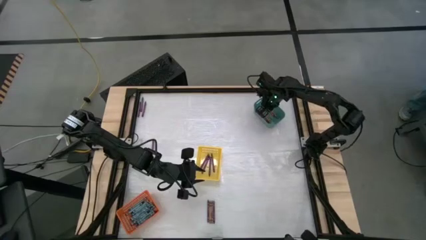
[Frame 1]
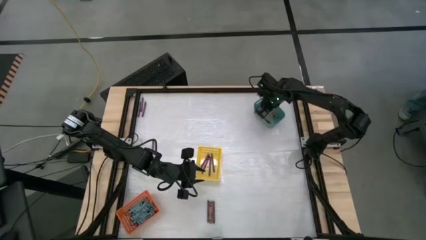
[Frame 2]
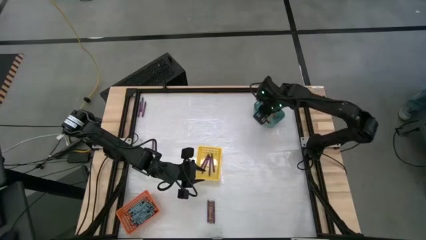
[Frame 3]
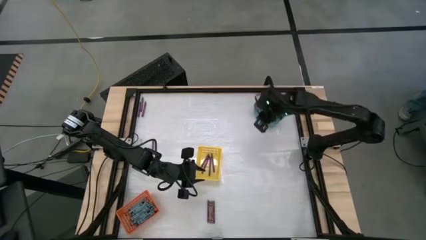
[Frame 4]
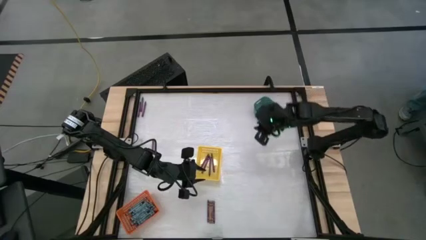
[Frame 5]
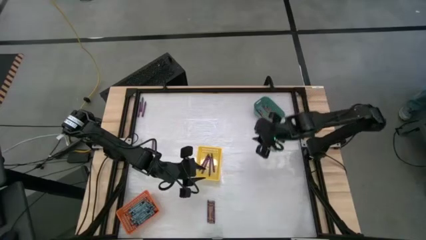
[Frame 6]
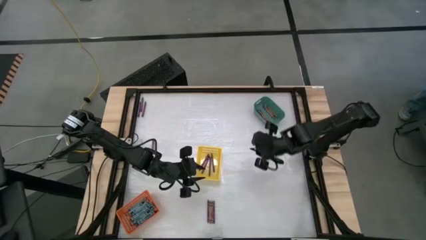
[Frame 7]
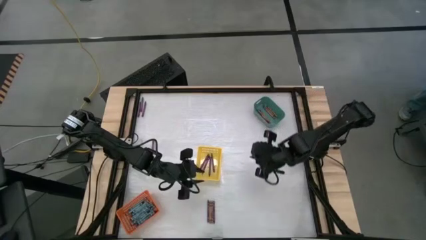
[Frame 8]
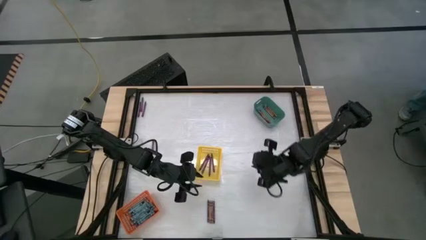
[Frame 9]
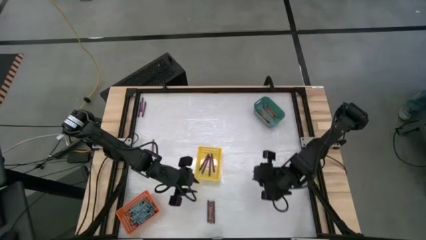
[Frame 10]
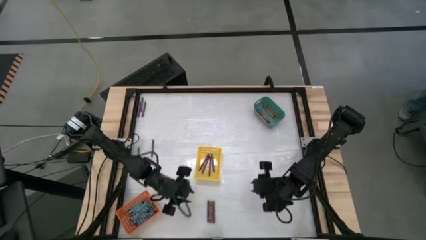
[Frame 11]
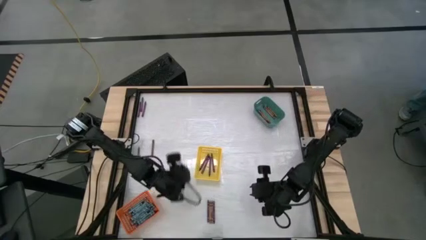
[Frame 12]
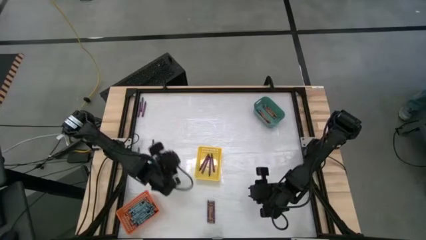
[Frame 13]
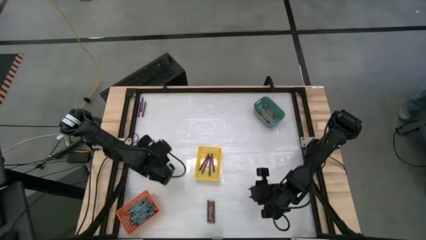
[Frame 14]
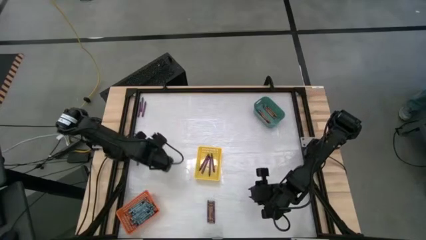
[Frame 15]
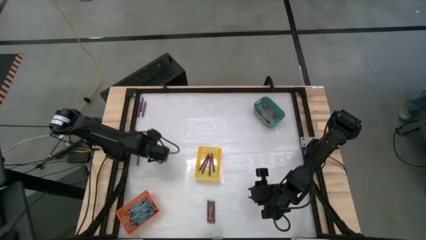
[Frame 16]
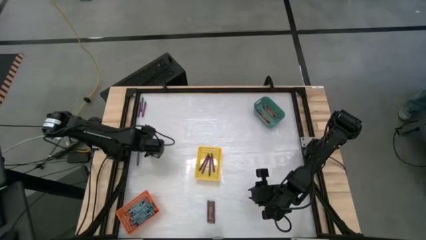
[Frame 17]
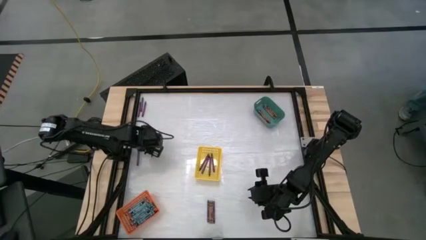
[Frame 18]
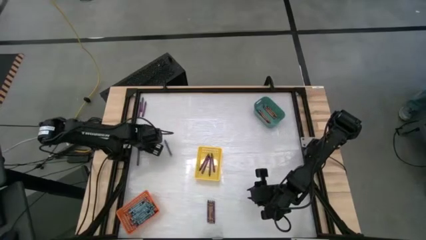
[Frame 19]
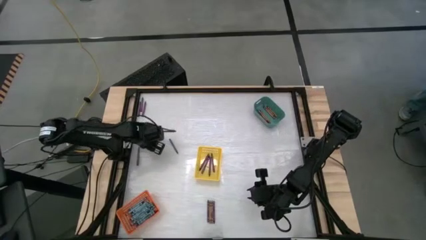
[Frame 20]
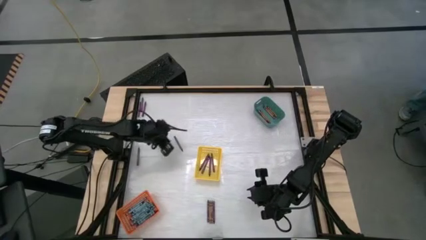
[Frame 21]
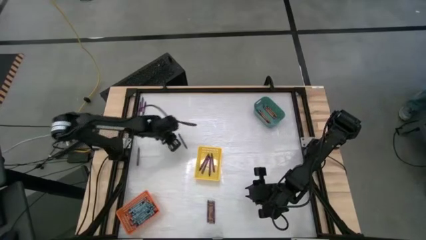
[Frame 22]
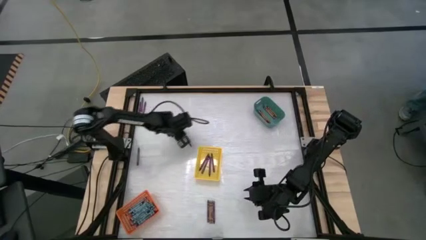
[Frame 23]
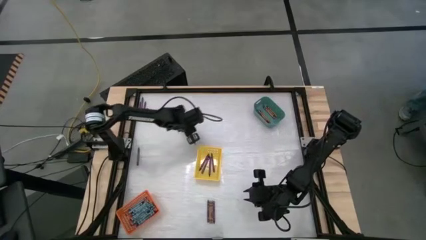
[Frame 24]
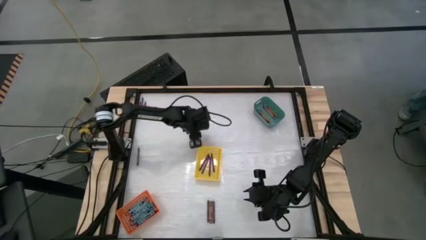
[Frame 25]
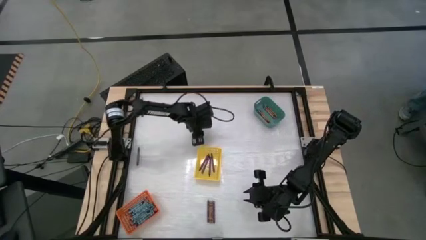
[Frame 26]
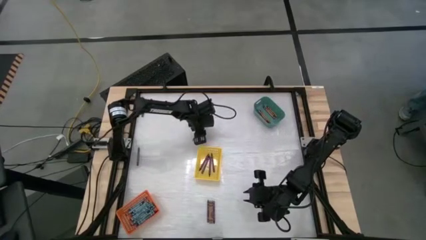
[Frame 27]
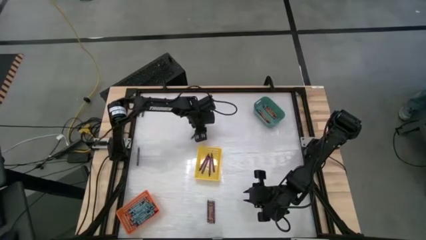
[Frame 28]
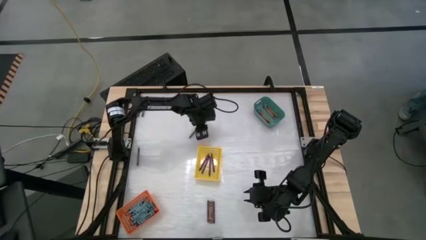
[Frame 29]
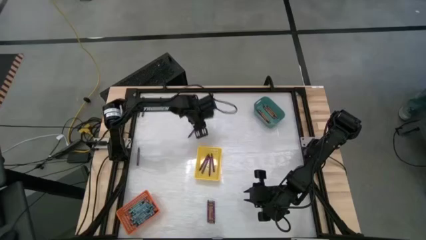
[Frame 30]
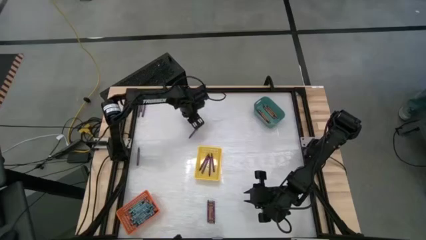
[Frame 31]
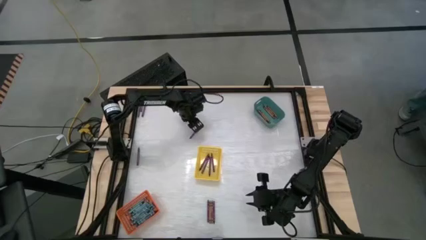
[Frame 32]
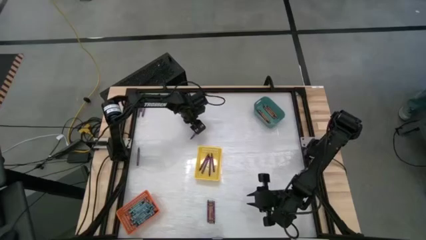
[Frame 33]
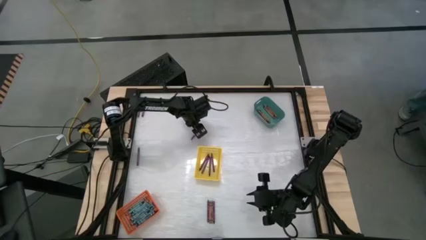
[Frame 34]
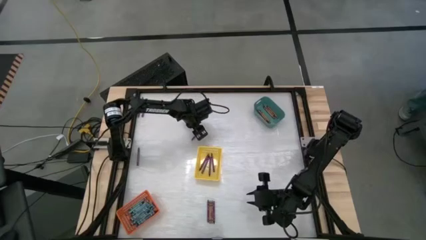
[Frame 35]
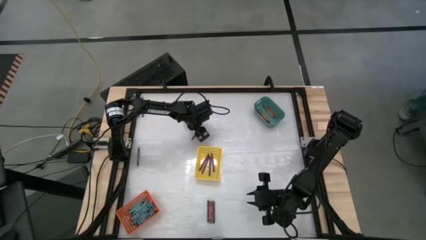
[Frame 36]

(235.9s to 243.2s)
Task: Sort crayons
Put the violet crayon into the yellow basket

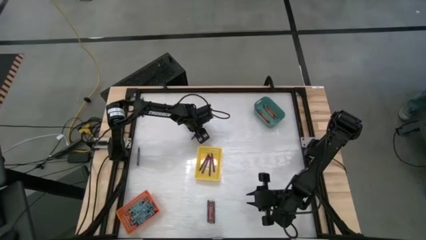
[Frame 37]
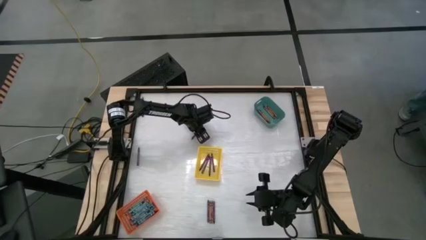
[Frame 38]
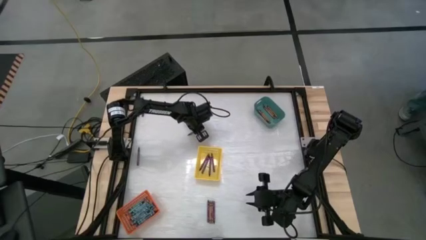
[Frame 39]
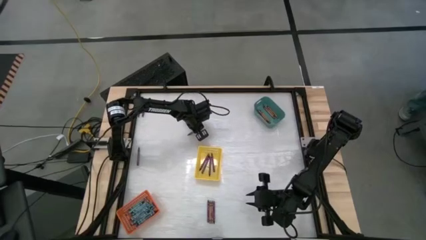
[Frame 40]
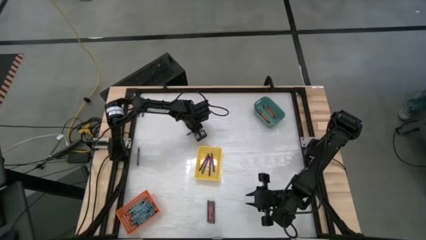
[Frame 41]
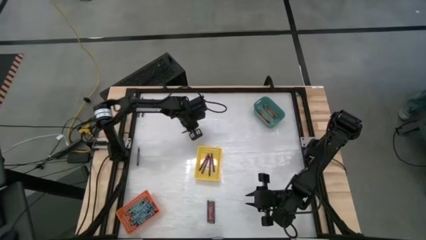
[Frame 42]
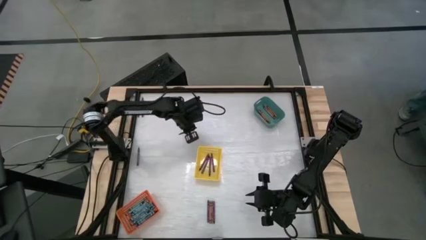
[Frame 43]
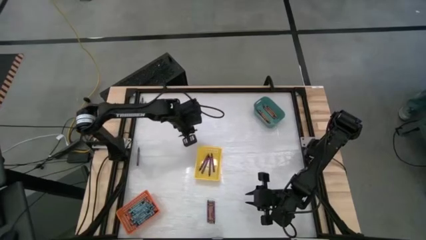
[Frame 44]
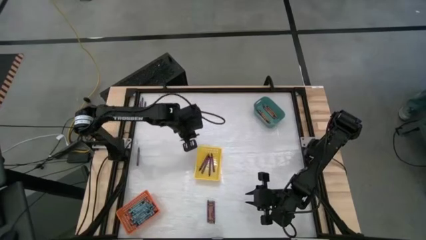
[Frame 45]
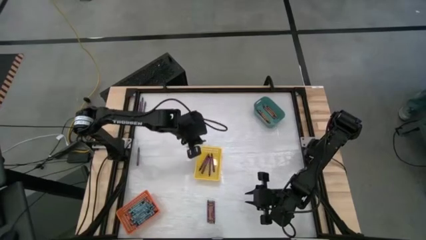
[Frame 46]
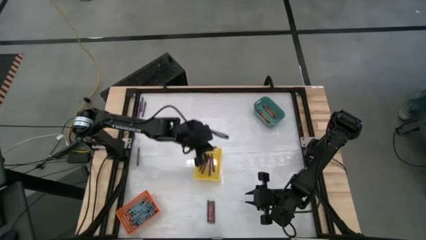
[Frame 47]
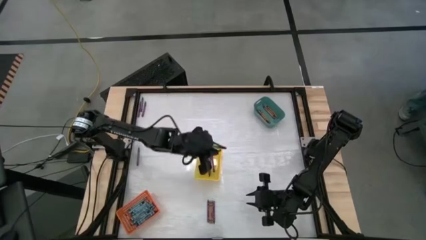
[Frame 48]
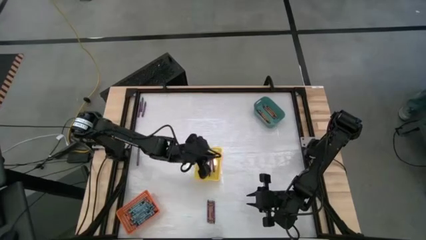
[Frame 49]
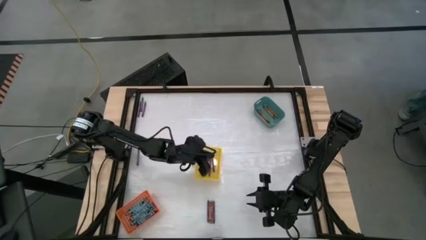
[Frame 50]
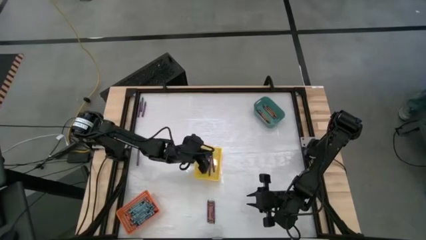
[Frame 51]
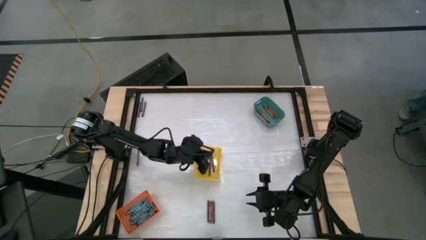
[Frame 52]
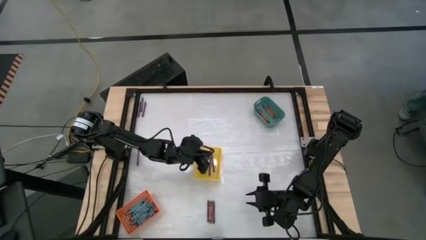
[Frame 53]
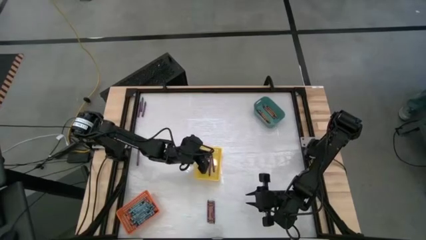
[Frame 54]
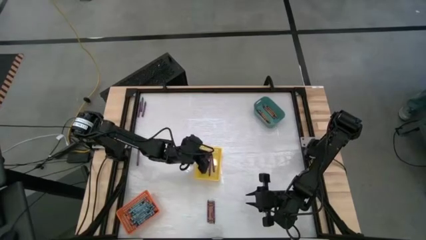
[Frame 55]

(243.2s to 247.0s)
Put the violet crayon into the yellow basket

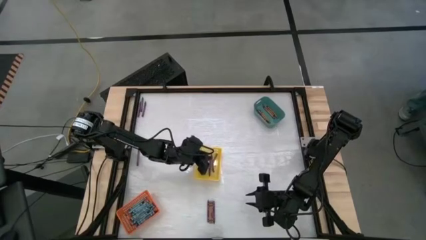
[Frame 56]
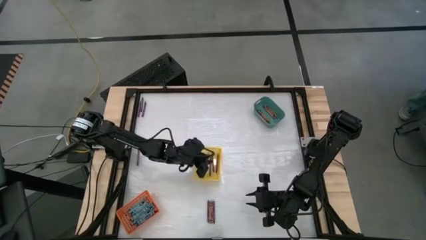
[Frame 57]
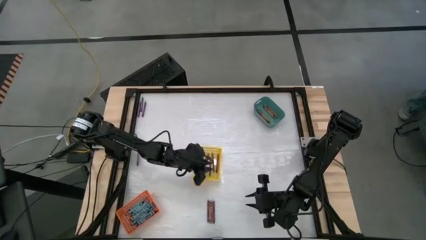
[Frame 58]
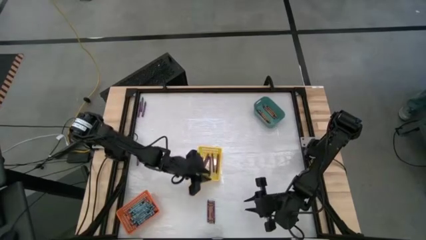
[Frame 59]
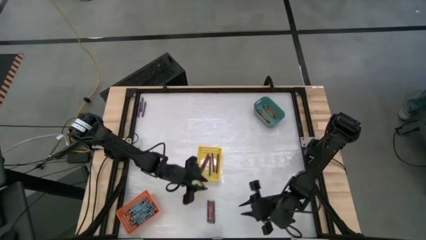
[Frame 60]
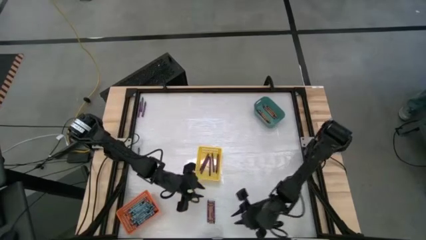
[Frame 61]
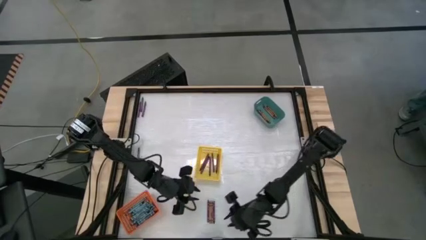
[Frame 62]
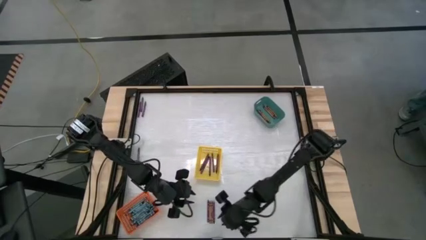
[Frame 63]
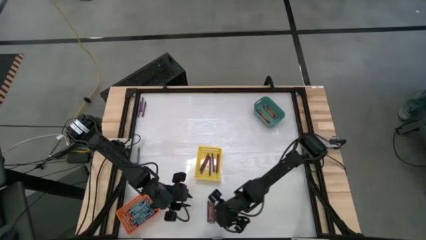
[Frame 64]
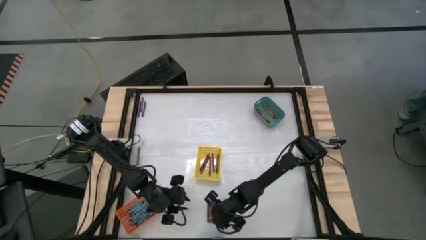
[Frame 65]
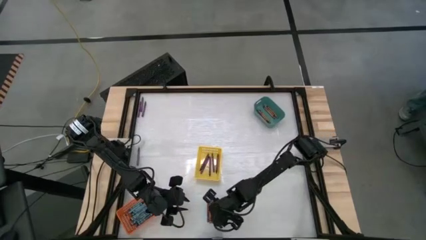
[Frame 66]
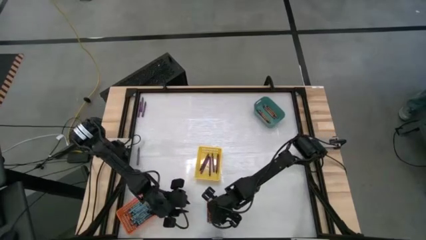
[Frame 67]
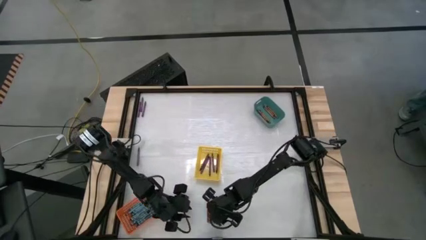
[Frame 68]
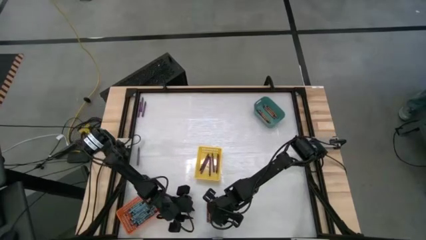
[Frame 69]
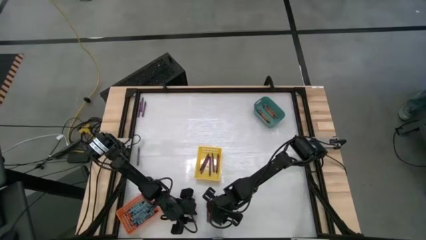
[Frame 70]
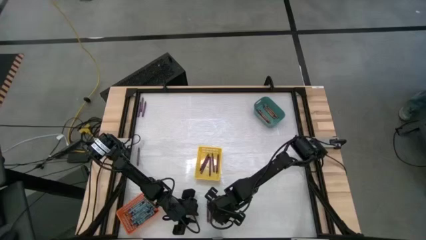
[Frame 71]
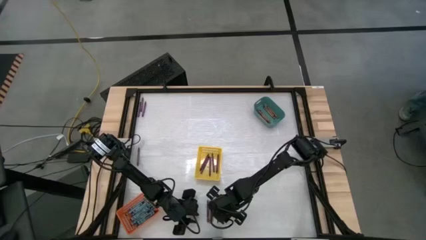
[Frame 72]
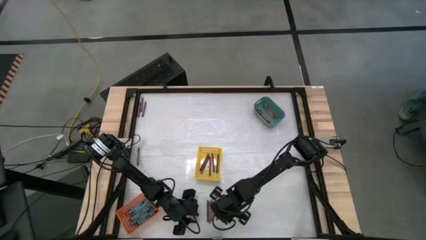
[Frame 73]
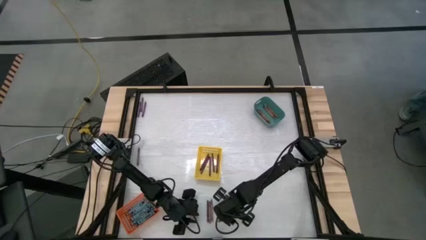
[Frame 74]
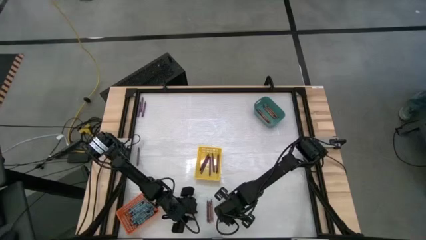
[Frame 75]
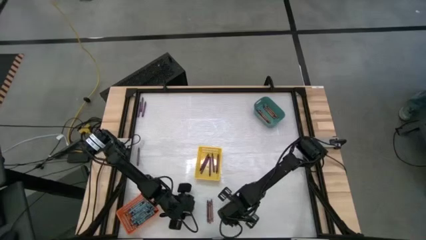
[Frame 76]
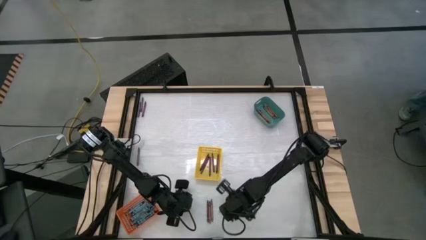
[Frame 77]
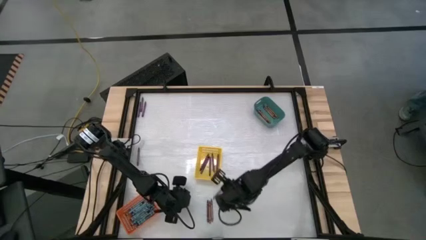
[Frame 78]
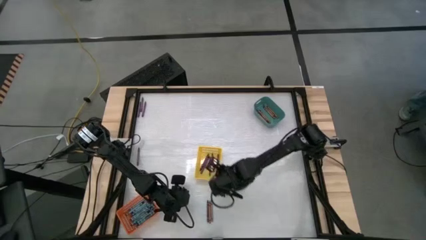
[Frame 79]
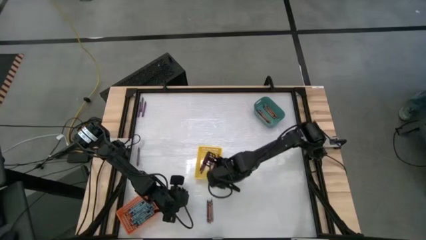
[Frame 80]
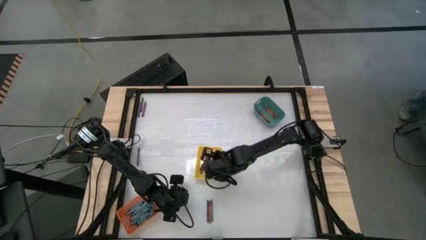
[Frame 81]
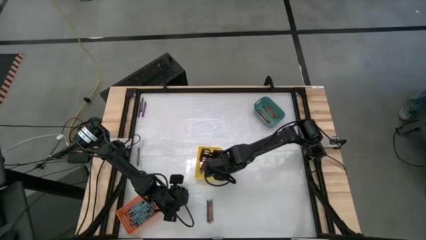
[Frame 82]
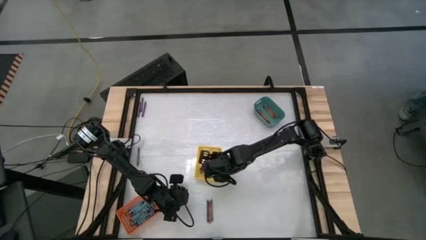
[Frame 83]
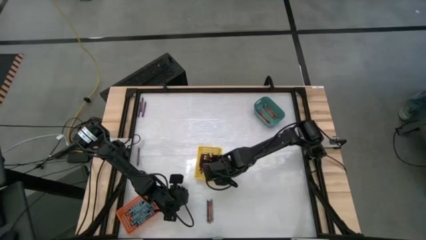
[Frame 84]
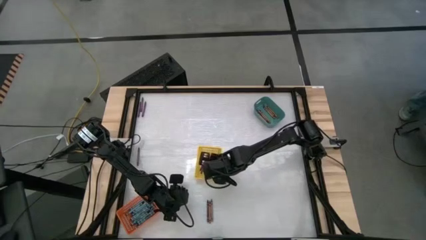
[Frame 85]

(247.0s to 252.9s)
Put the violet crayon into the yellow basket
